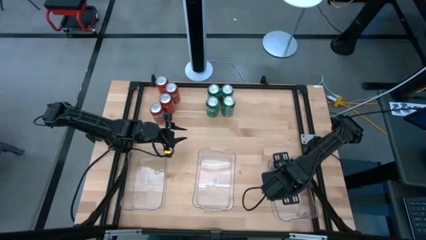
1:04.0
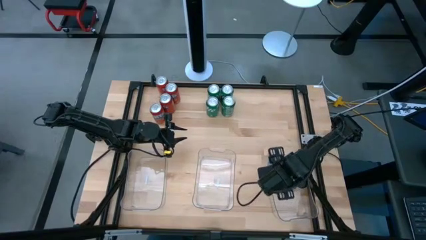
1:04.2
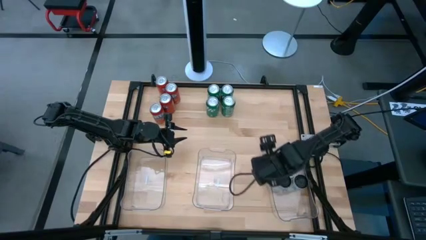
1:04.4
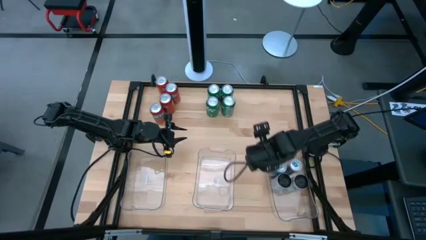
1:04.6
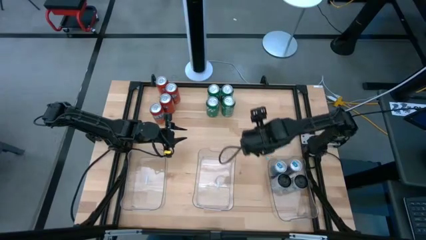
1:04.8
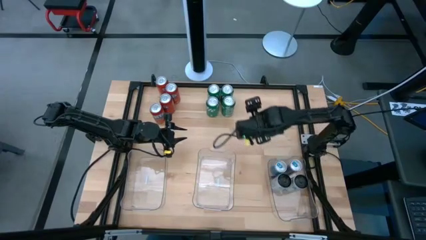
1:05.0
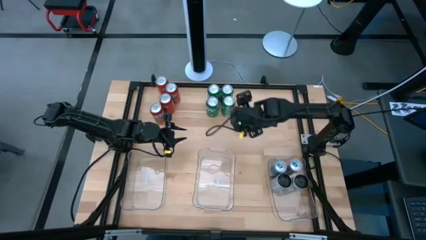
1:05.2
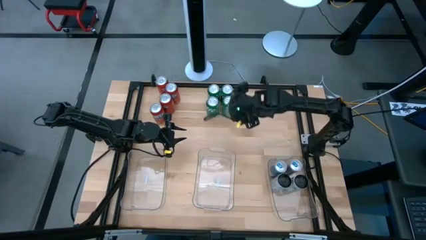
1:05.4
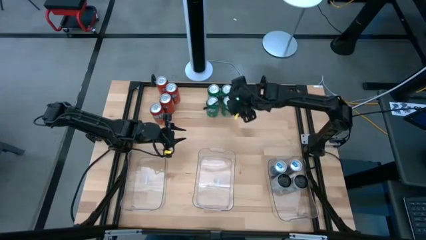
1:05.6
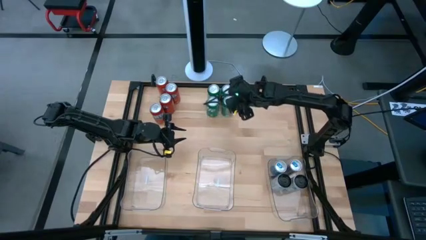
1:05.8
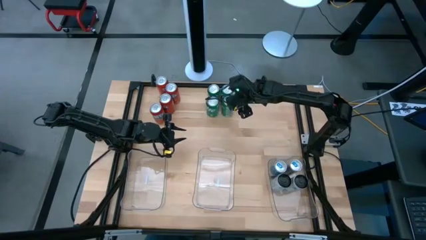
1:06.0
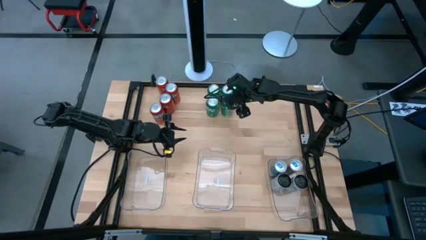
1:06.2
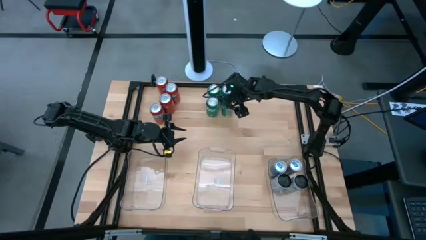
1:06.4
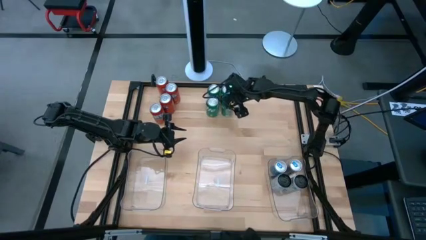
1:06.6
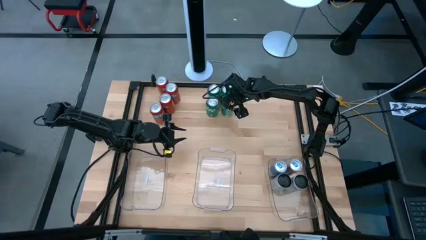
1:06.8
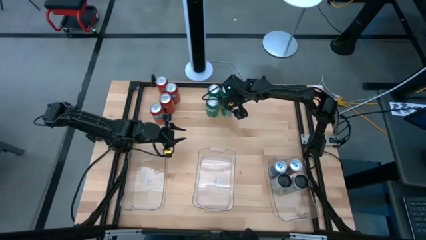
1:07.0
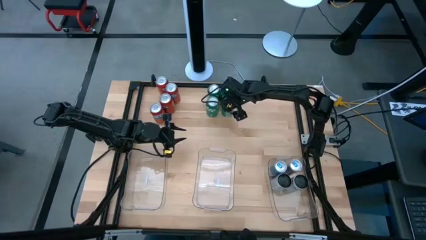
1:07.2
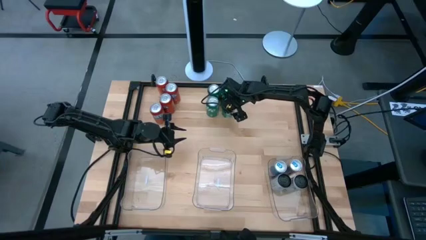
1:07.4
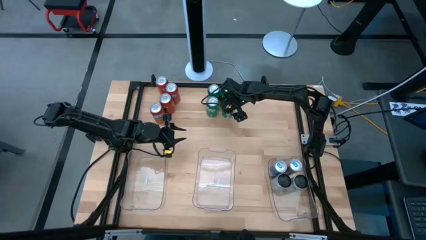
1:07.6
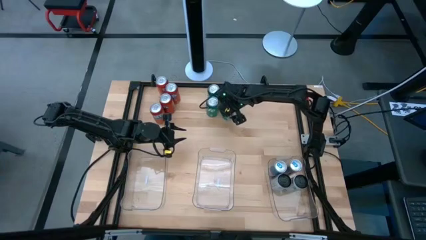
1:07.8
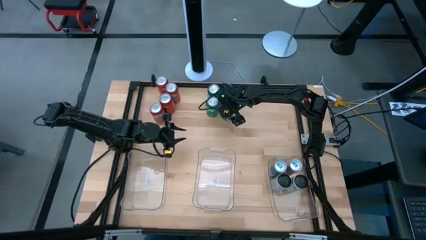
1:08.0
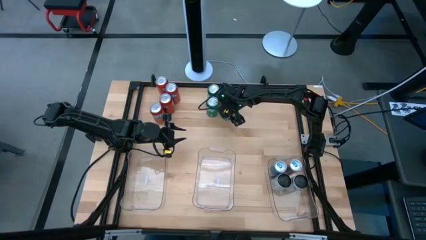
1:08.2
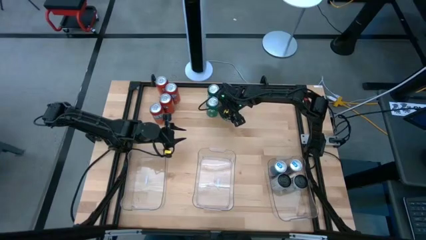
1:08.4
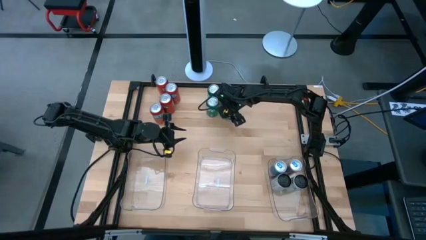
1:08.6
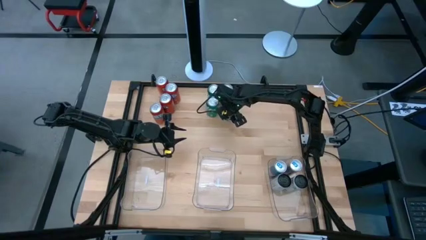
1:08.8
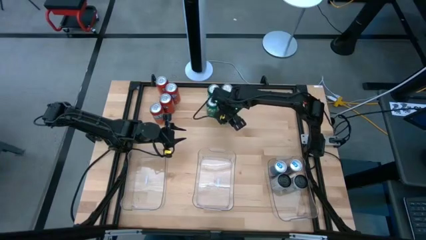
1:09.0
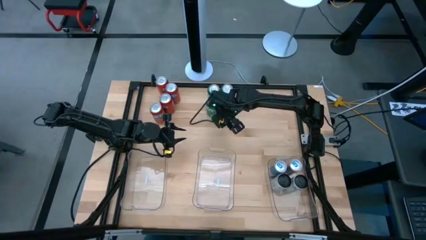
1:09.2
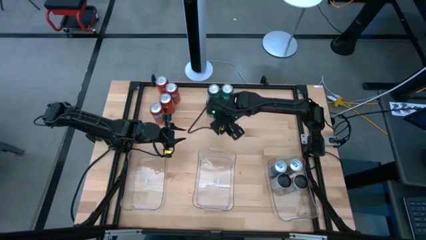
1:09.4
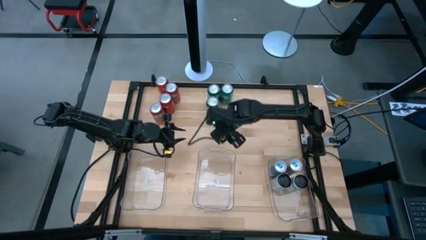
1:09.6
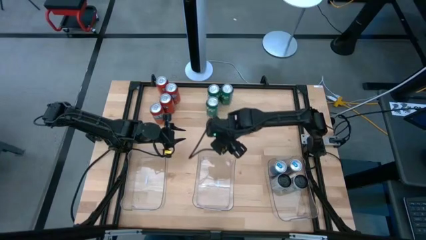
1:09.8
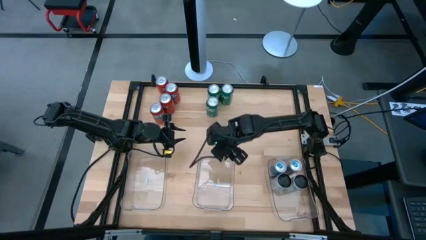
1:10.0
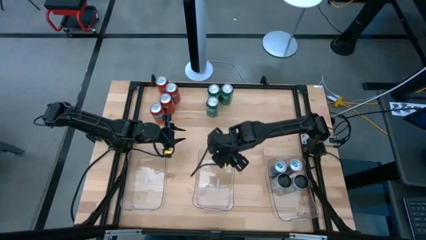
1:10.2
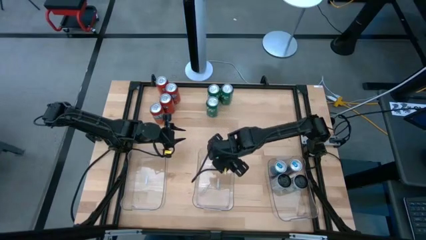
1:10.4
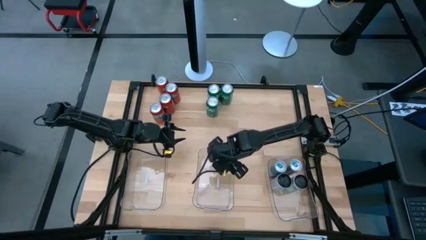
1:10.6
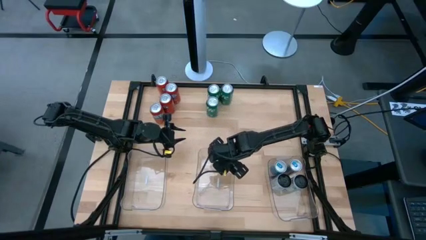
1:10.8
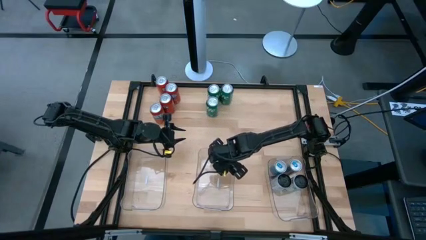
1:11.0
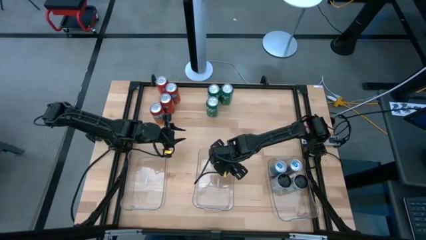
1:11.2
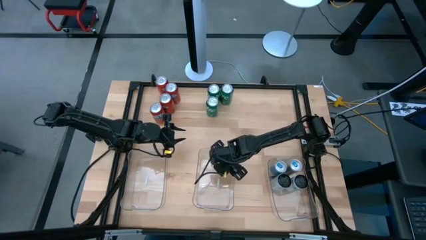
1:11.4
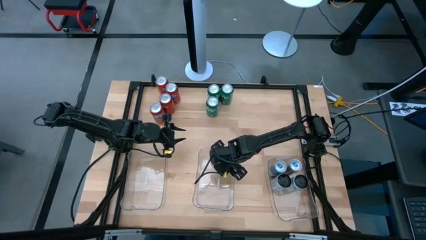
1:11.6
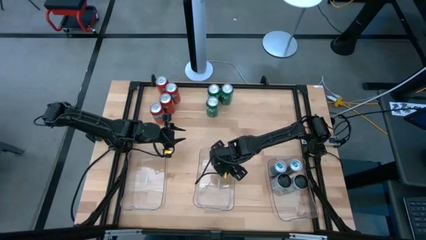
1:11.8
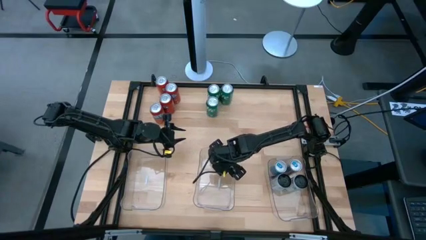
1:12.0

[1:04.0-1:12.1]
Task: Sort soda cans
Put the green soda can into the center transparent bin
